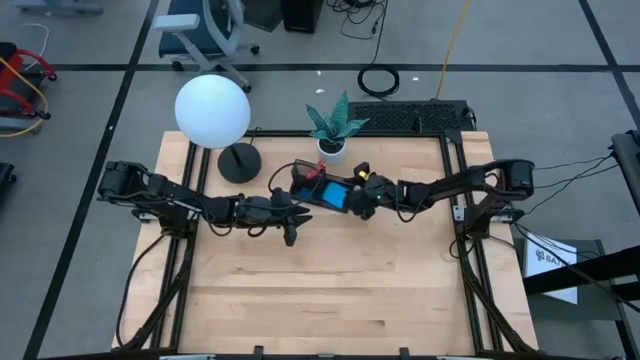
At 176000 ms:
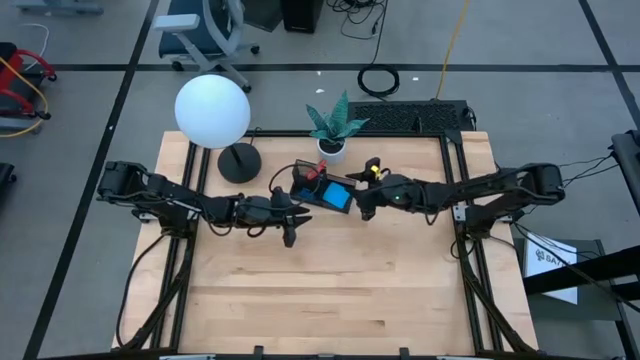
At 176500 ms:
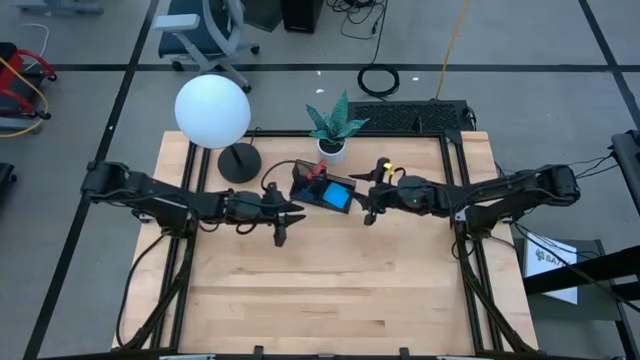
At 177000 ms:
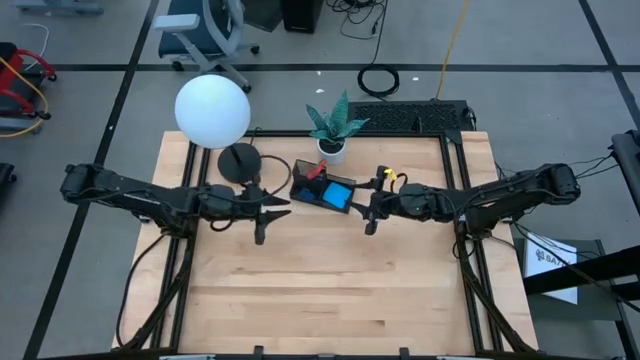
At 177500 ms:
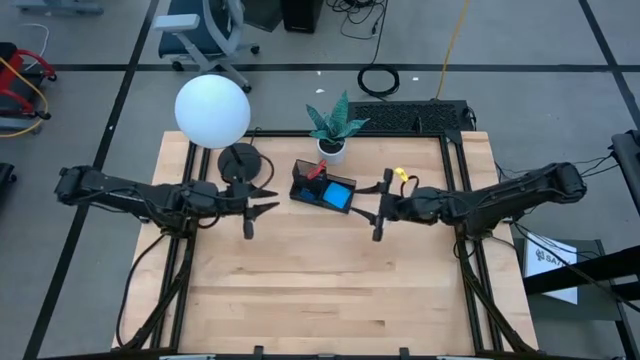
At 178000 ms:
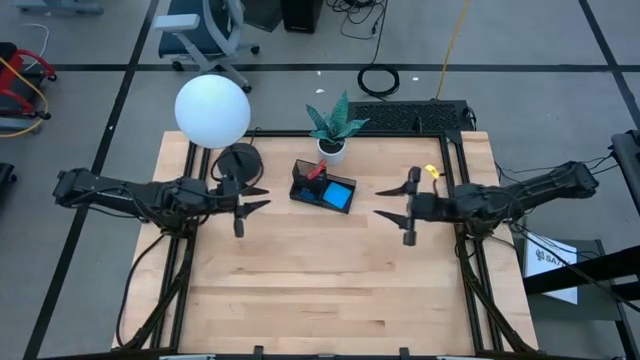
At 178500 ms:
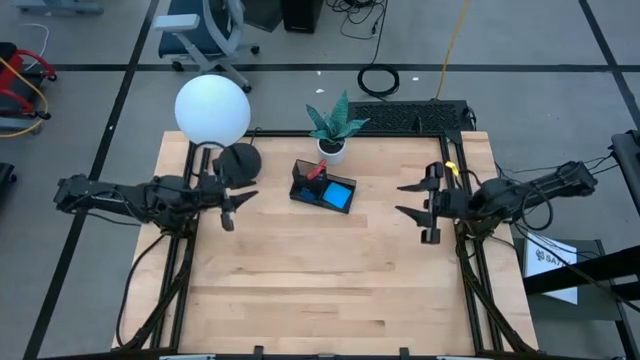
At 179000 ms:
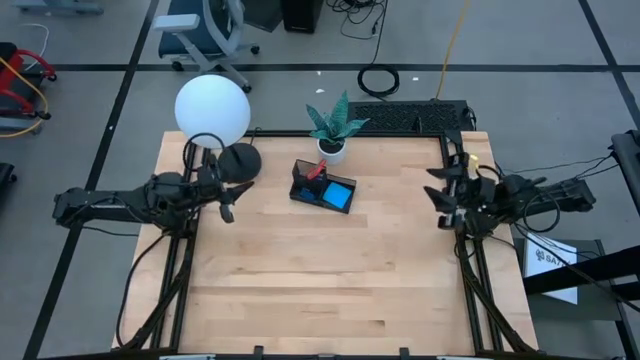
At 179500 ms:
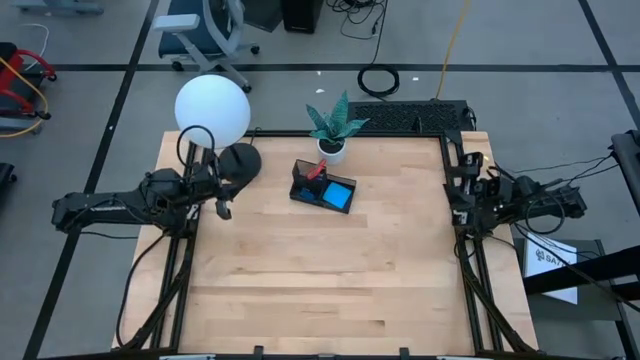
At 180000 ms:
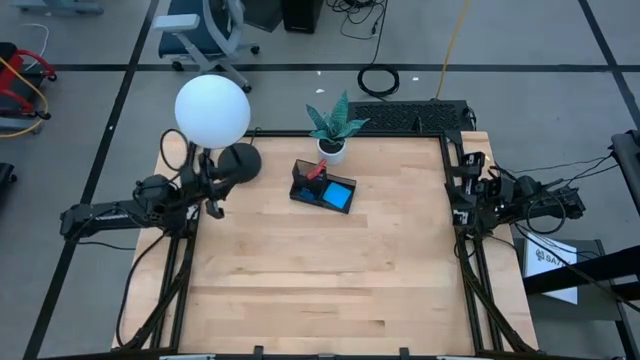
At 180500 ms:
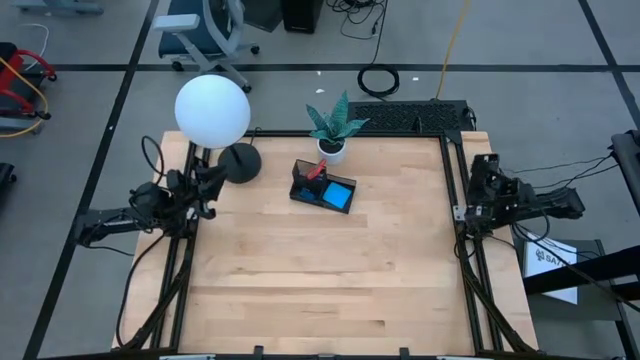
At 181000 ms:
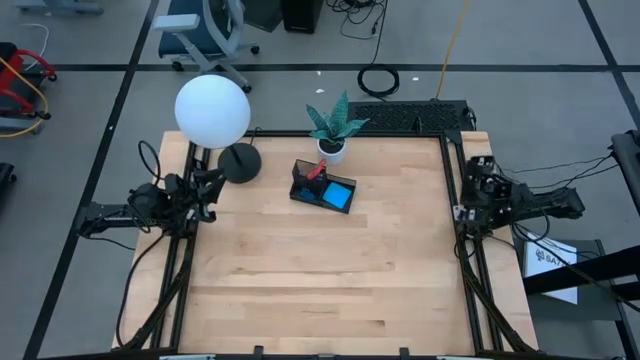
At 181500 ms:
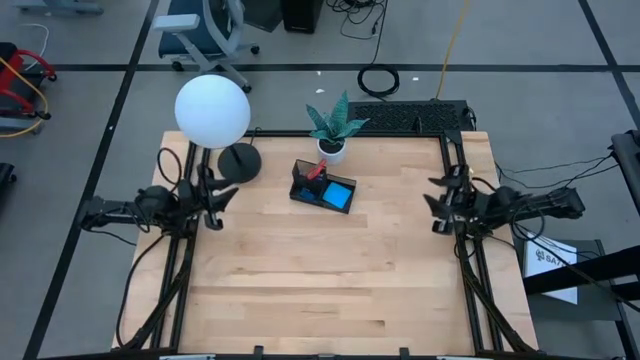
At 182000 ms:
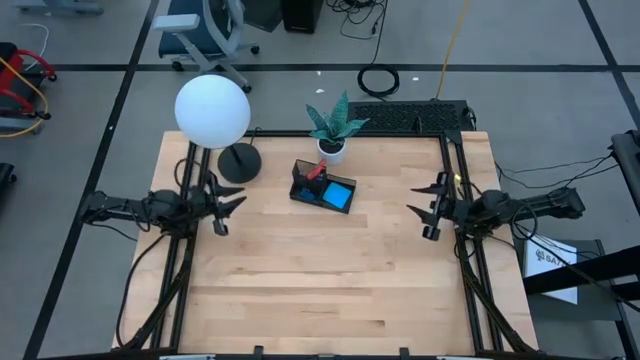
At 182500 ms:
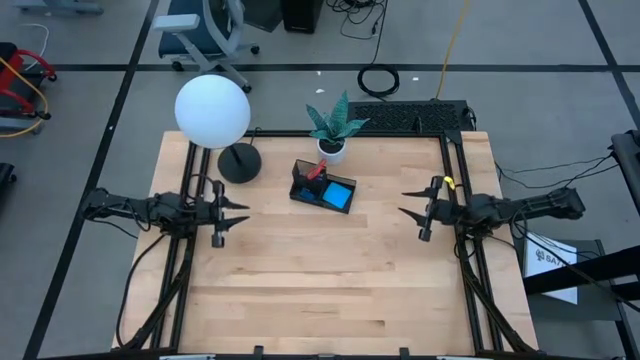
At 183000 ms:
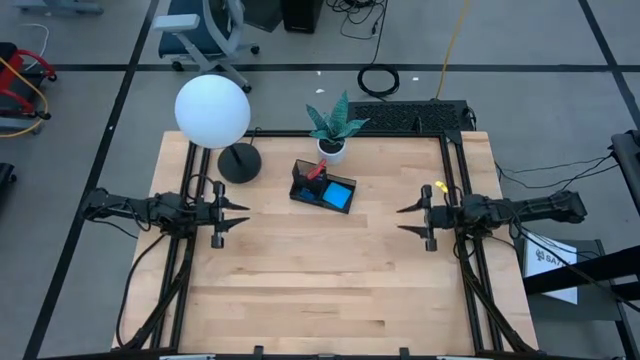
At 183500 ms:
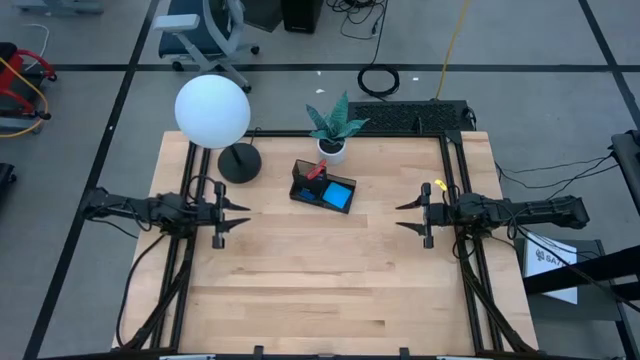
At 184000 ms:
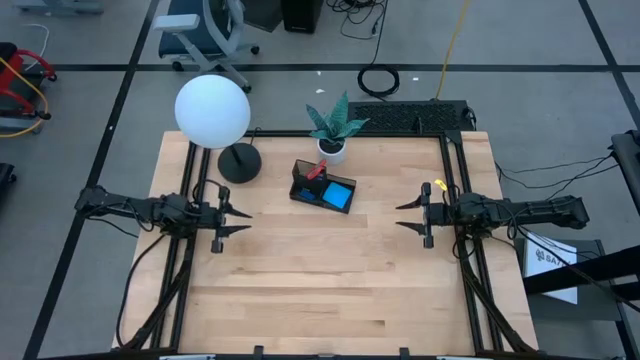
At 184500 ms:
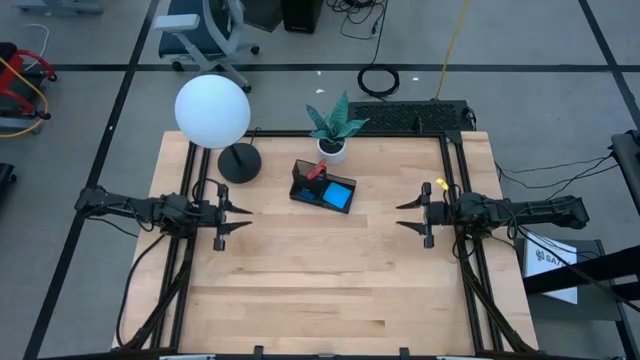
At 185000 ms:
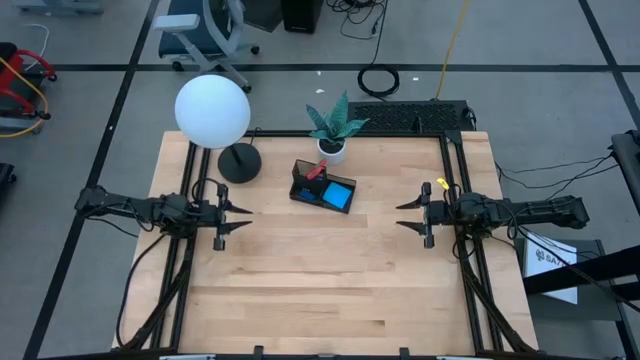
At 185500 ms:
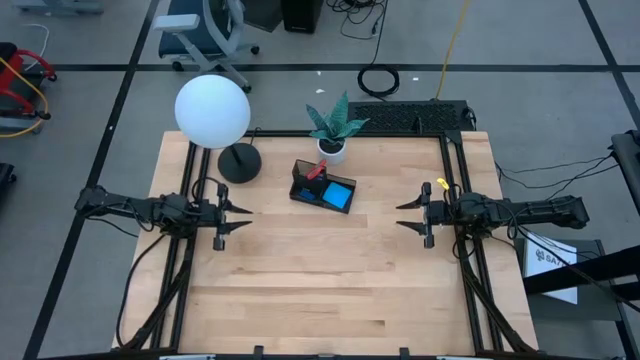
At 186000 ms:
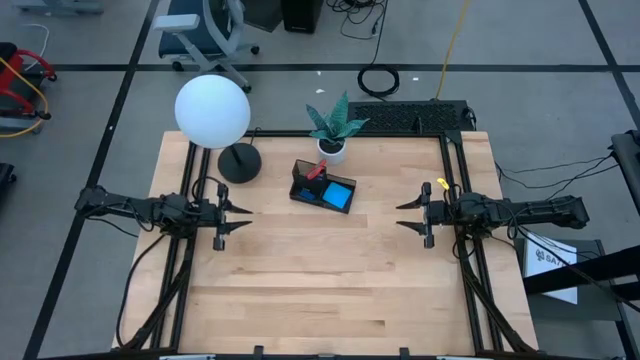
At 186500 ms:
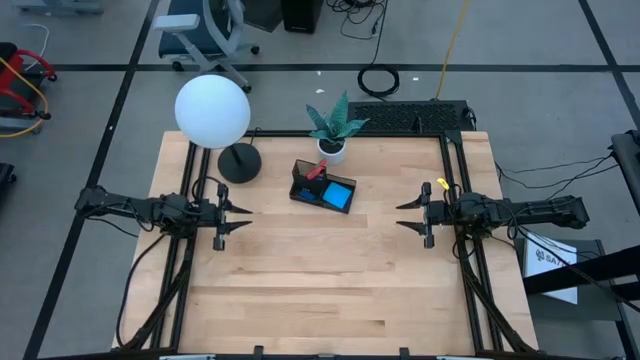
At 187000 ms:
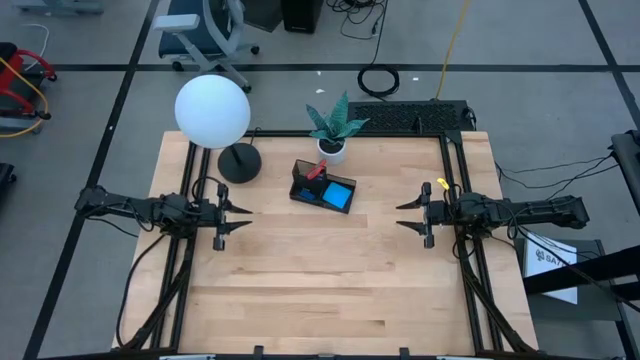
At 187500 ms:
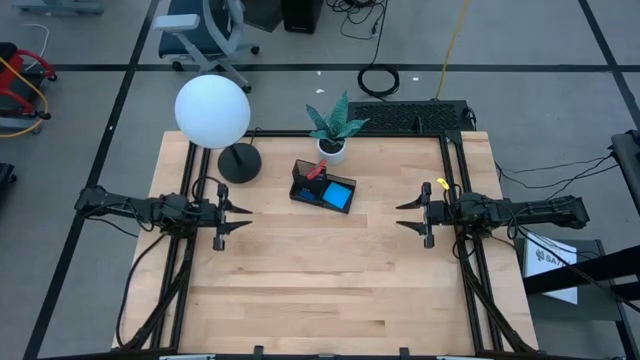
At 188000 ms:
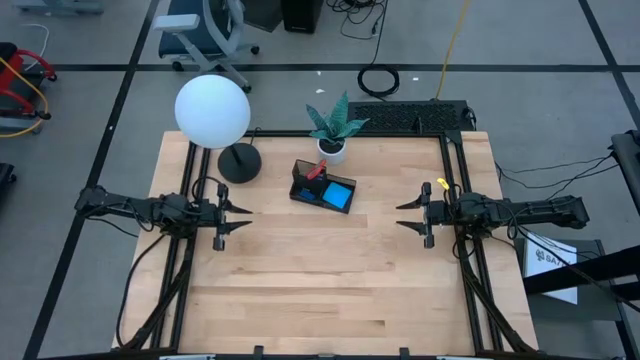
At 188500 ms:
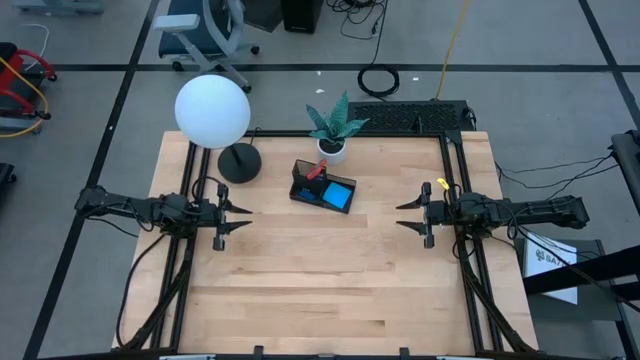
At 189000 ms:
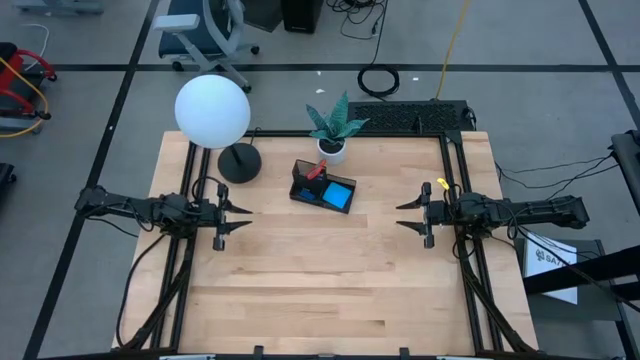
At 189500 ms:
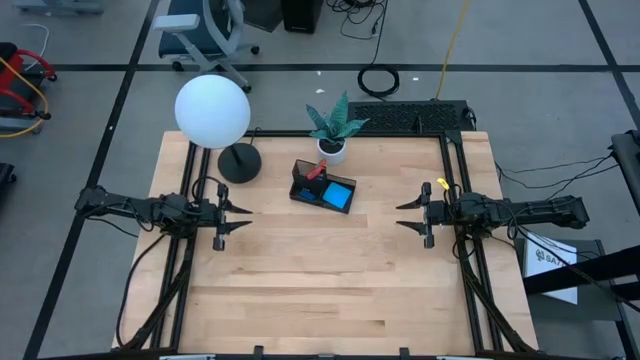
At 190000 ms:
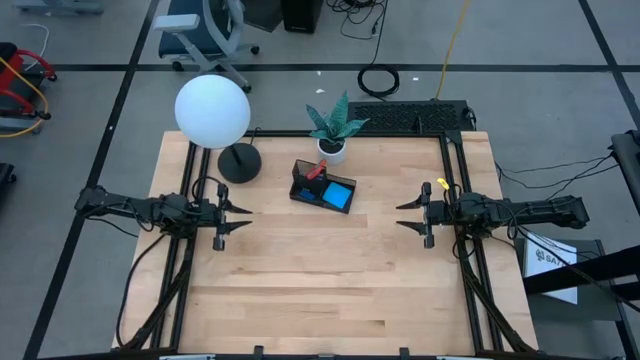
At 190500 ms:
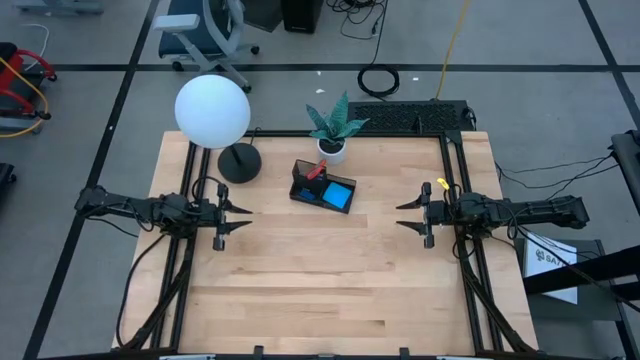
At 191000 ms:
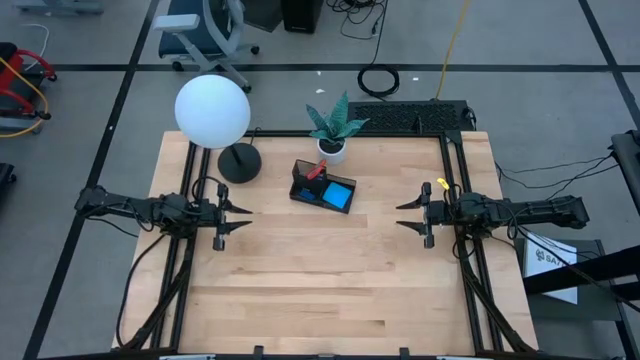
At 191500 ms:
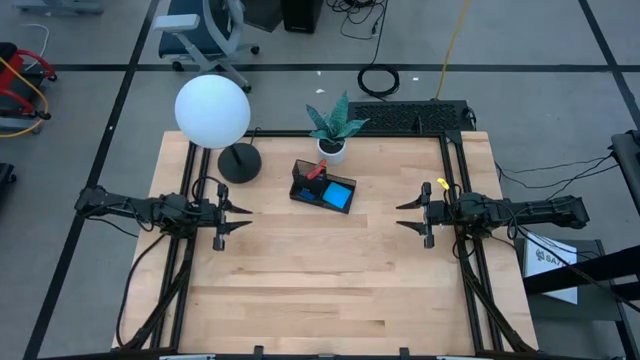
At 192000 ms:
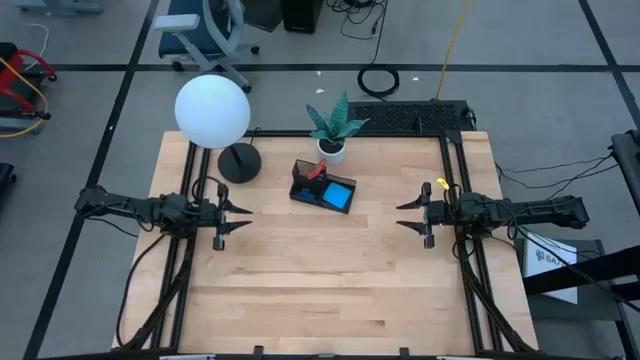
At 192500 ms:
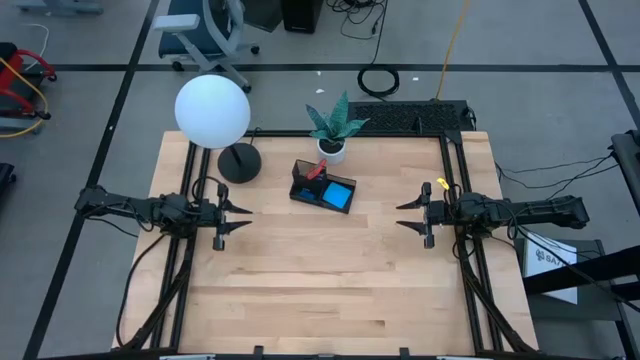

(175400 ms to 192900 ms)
Task: Pick and place office supplies into organizer
Return to Home Position

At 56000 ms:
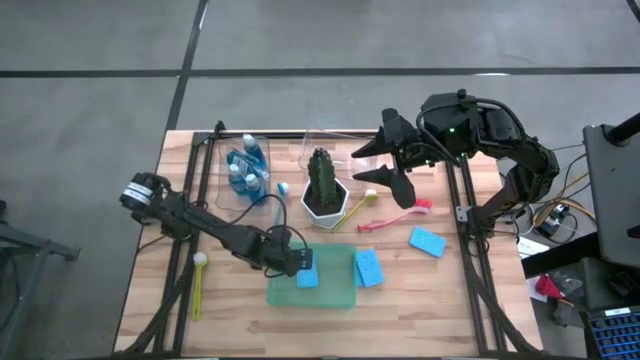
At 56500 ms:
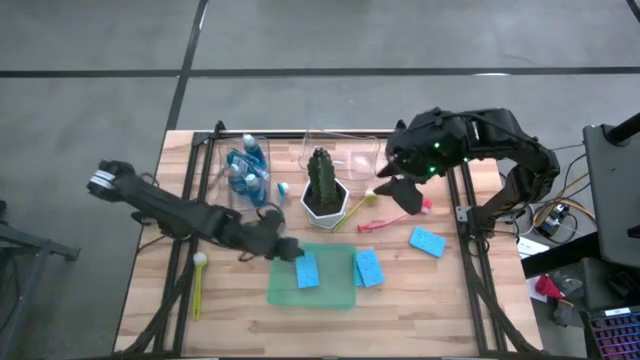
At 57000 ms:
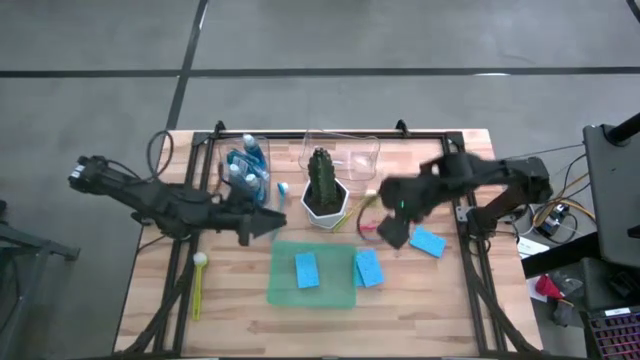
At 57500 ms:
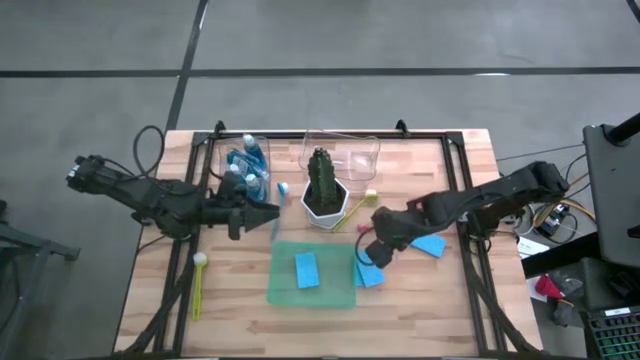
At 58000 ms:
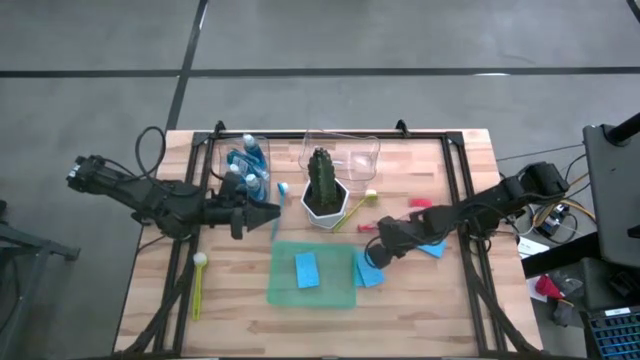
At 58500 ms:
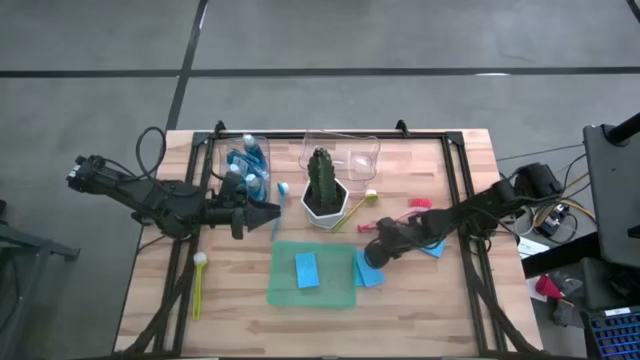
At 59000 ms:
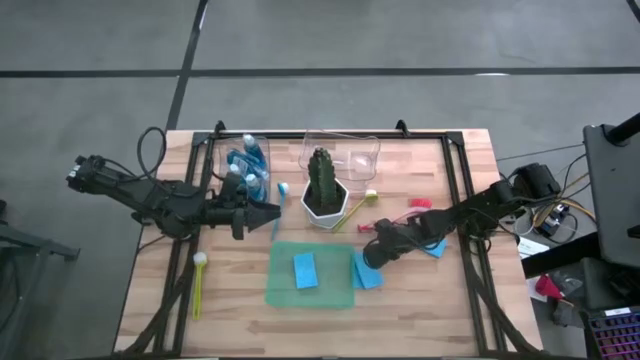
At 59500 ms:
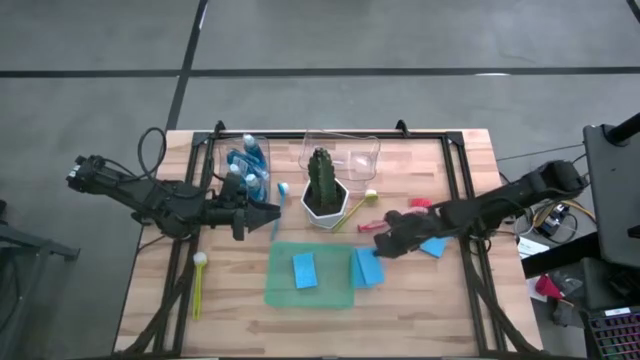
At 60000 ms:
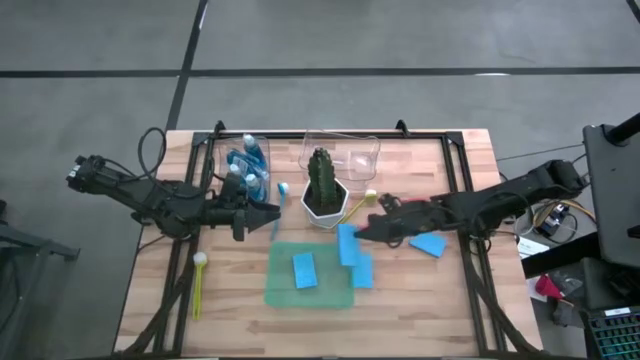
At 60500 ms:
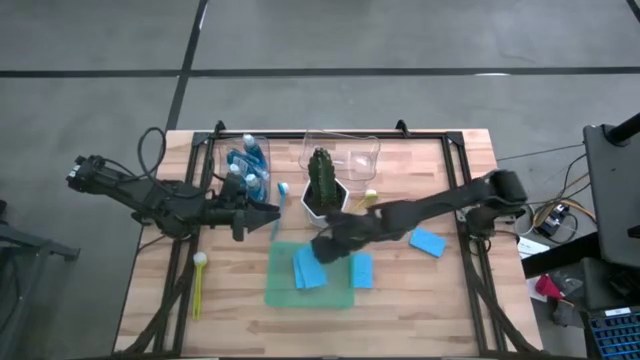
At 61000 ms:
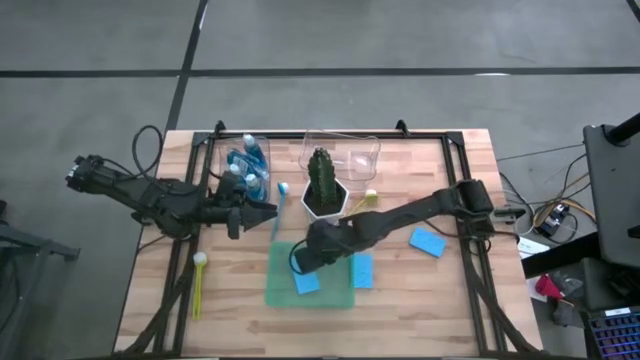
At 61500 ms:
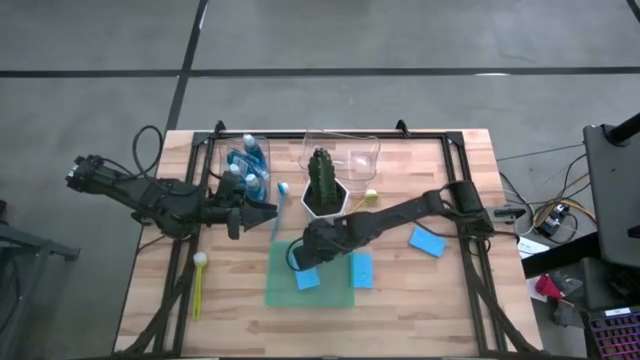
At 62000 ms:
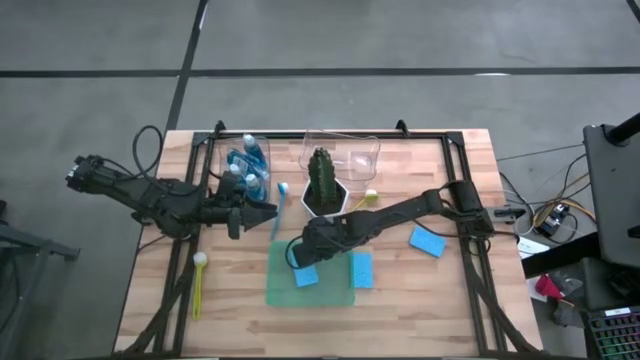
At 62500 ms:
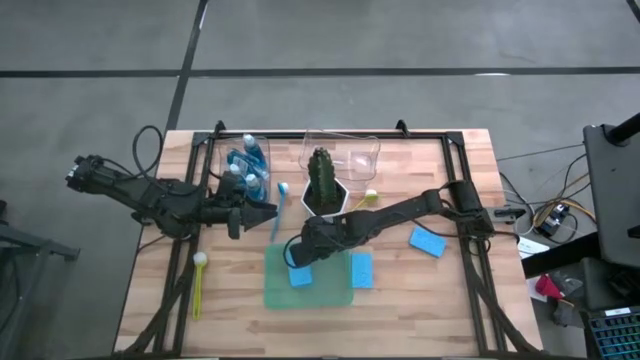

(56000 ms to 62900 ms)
Task: Pick & Place Kitchen Sink Supplies
Put the blue sponge into the green bin
